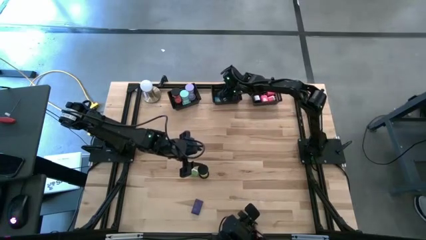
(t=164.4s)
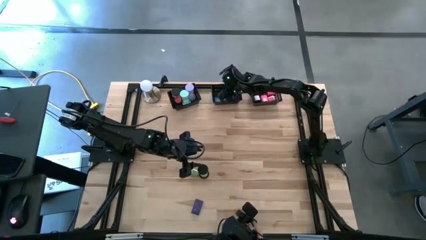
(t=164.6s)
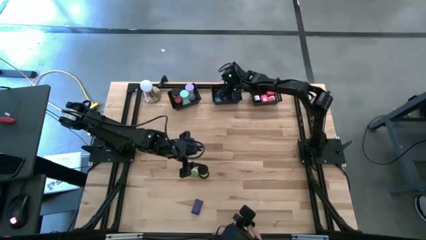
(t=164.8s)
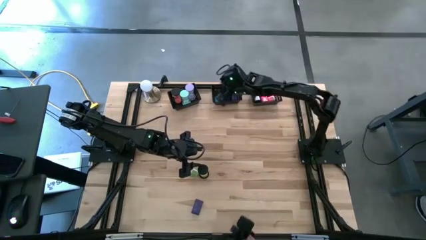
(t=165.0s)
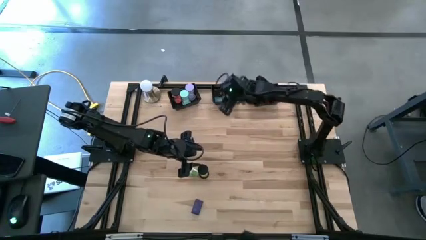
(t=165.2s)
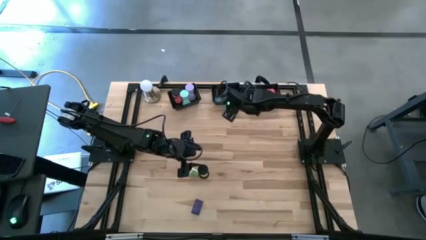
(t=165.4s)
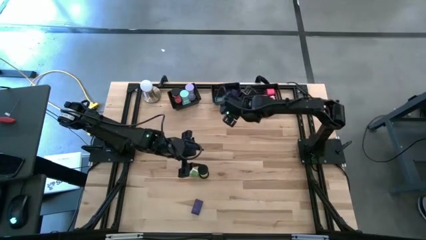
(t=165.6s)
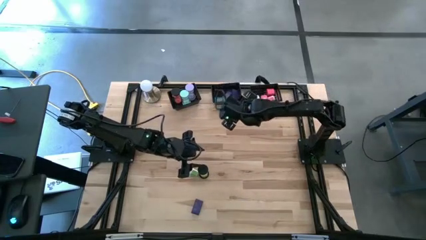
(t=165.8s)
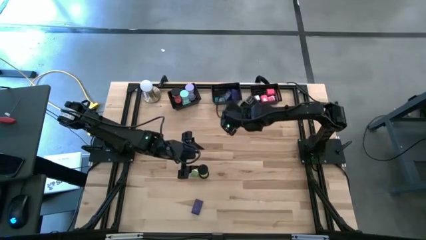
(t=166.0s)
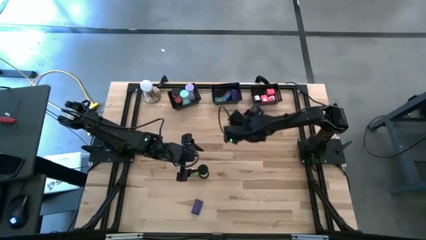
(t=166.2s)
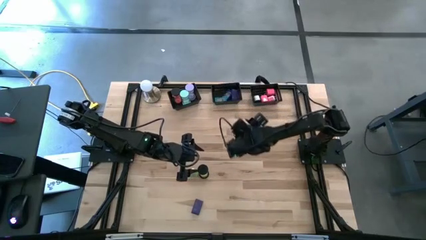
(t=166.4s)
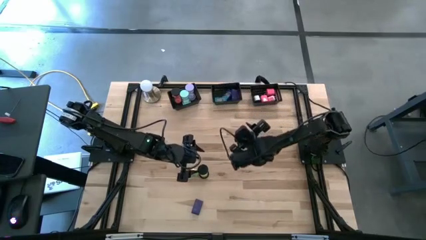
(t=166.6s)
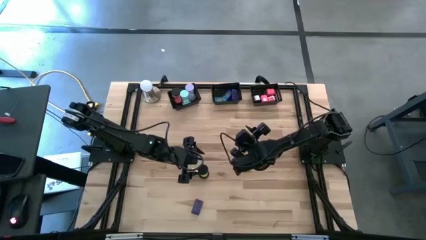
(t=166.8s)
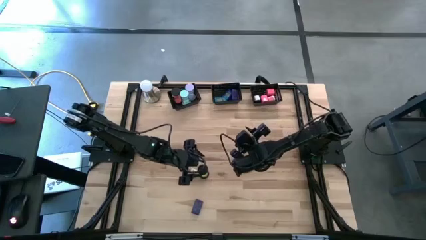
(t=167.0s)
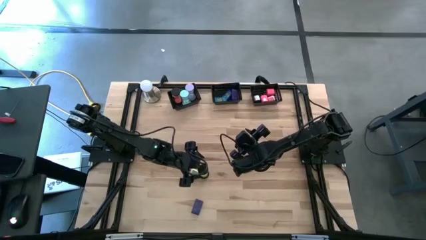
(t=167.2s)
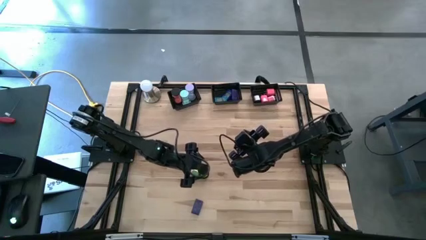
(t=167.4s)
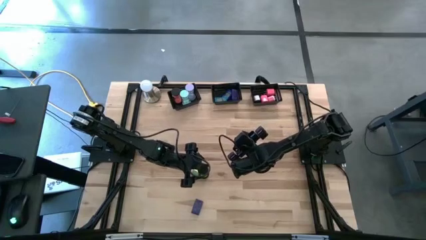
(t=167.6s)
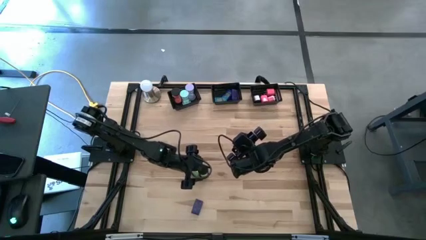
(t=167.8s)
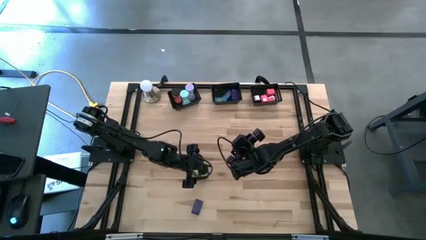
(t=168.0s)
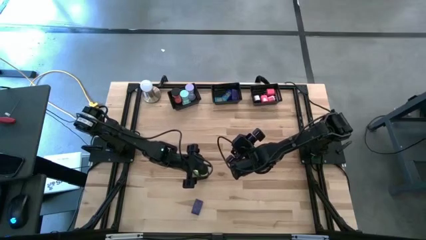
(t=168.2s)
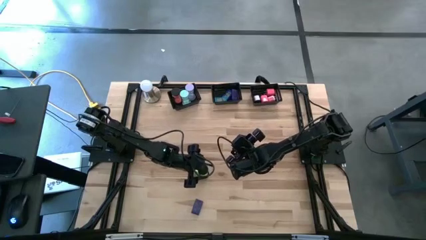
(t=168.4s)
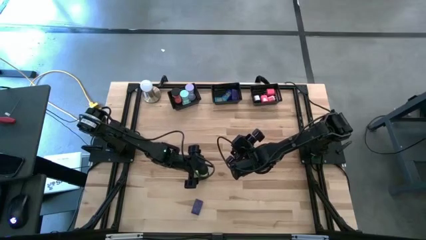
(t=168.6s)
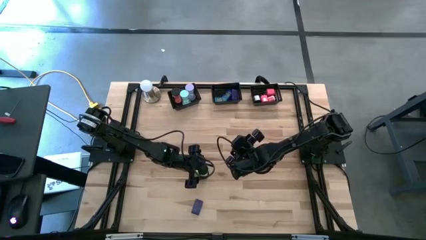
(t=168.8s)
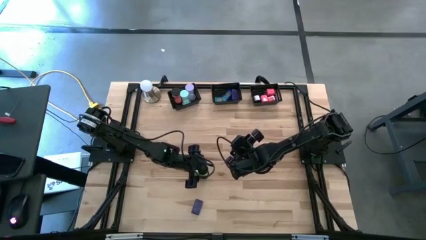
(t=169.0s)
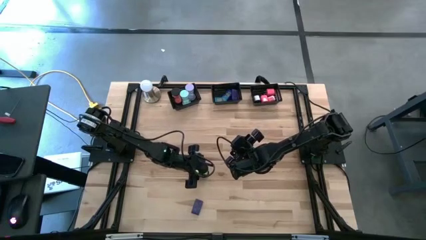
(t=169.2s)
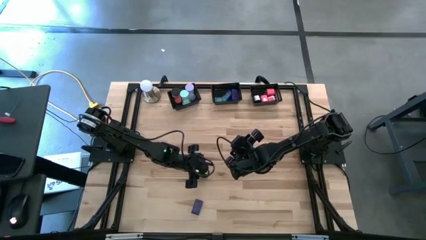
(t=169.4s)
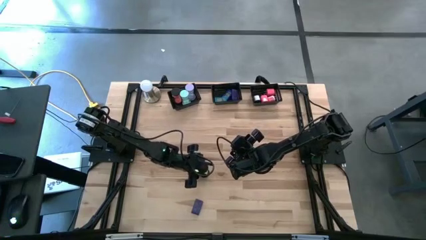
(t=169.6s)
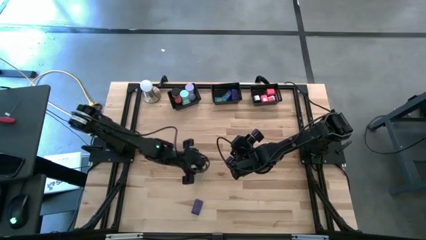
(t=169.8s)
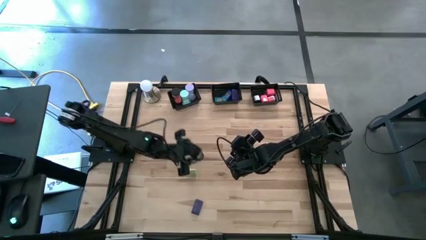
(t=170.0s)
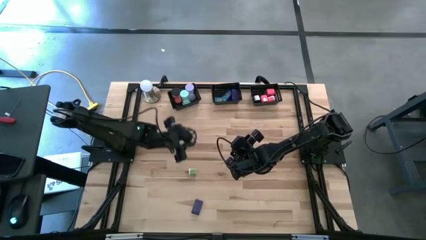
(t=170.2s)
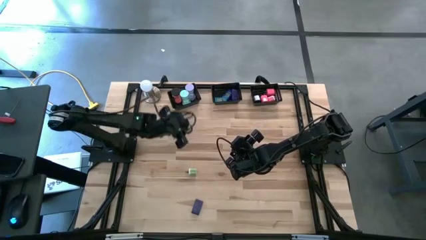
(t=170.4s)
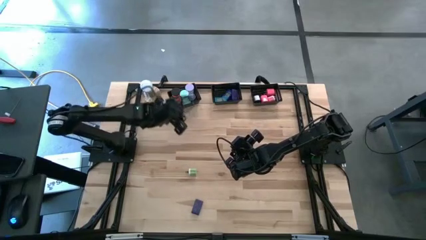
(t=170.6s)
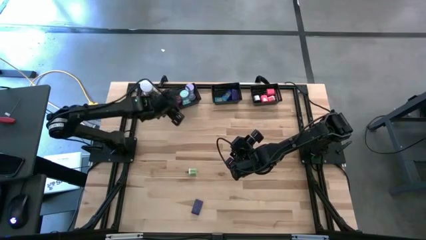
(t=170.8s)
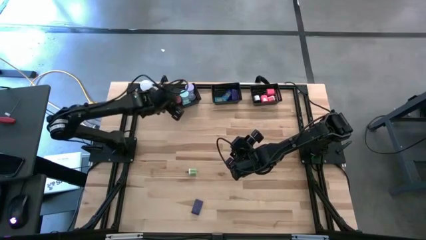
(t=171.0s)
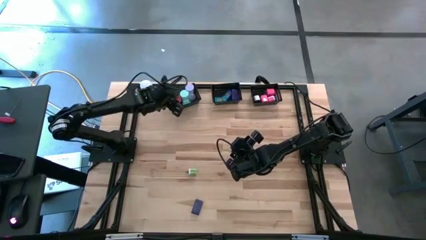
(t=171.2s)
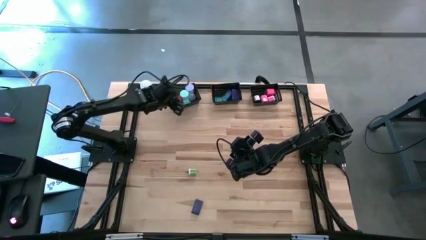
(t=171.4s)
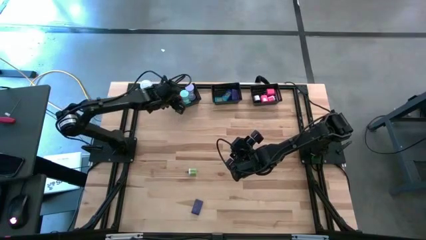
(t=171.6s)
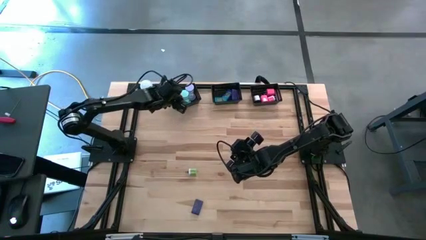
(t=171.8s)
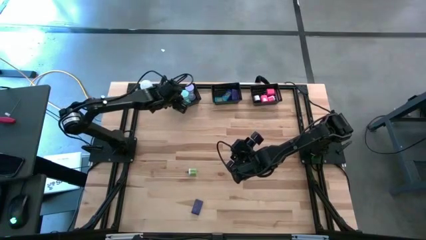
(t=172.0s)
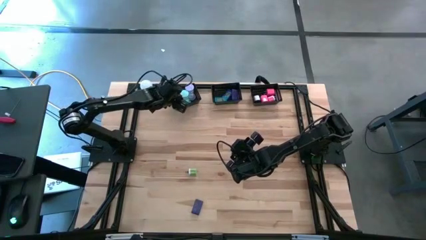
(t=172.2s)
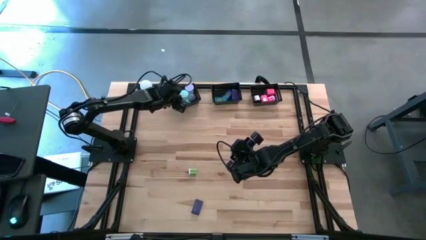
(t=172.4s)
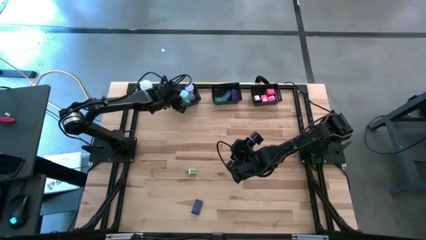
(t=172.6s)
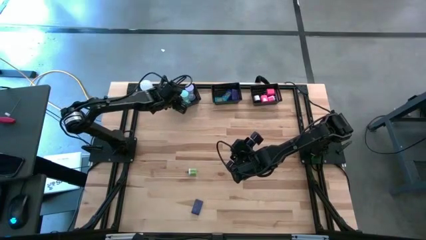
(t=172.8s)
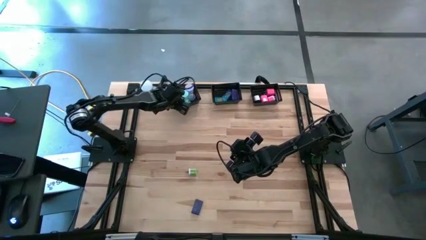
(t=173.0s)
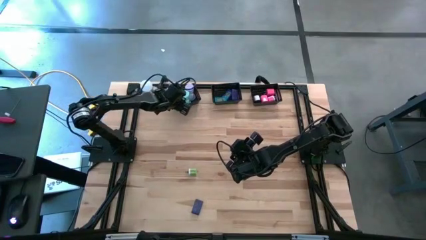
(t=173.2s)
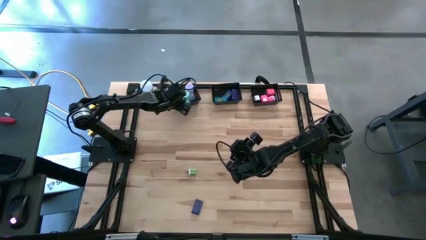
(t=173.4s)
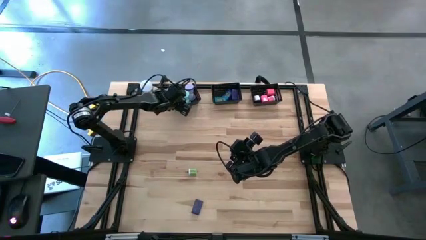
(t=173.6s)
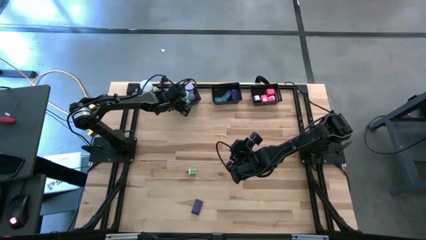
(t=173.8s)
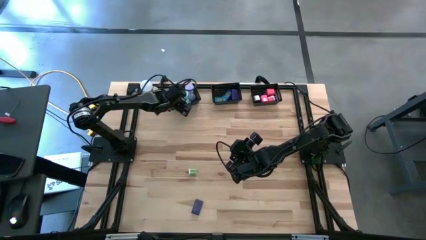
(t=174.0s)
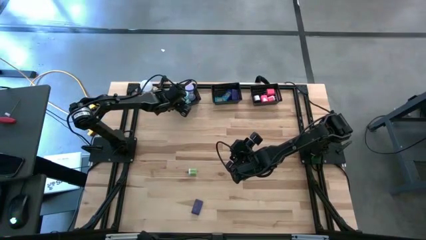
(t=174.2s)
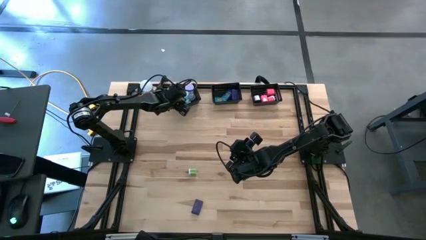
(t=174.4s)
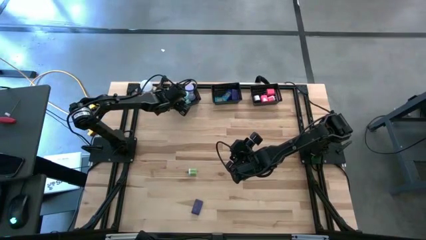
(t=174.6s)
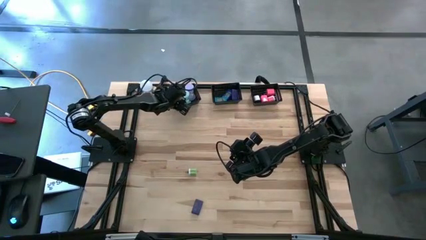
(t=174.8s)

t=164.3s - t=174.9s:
Task: Pick & Place Office items
Put the green hourglass into the left black bin
